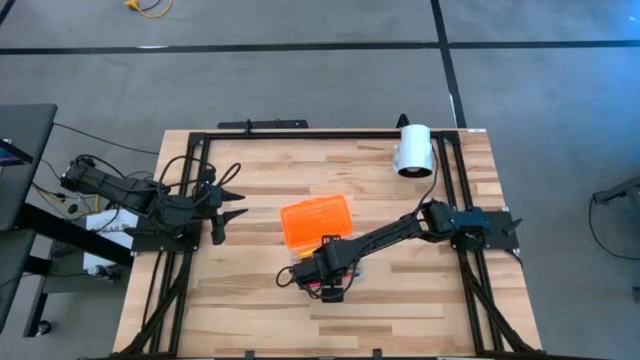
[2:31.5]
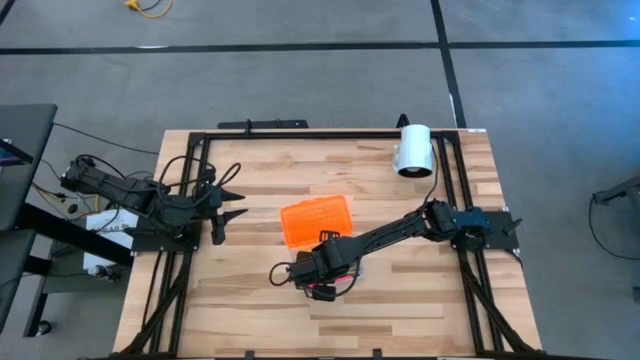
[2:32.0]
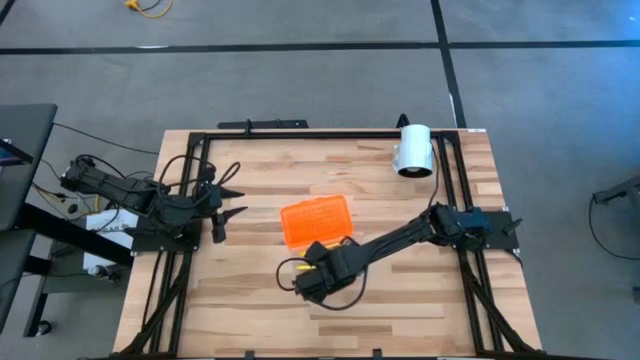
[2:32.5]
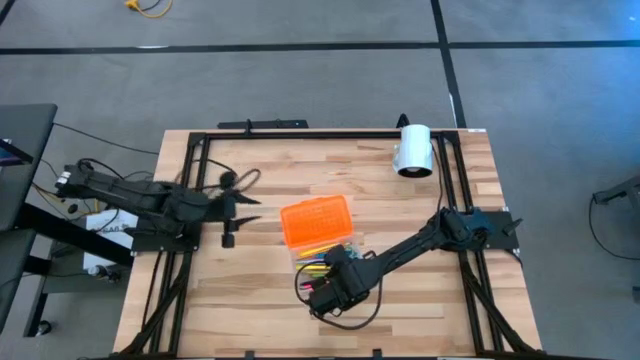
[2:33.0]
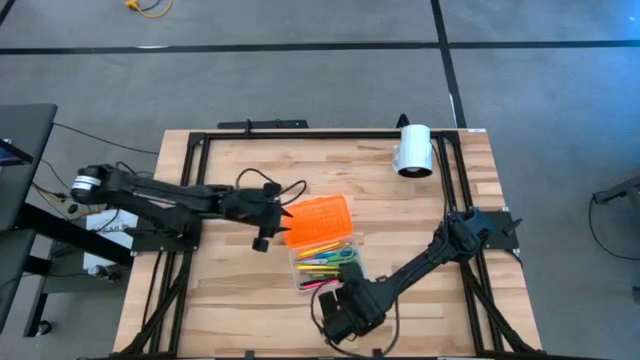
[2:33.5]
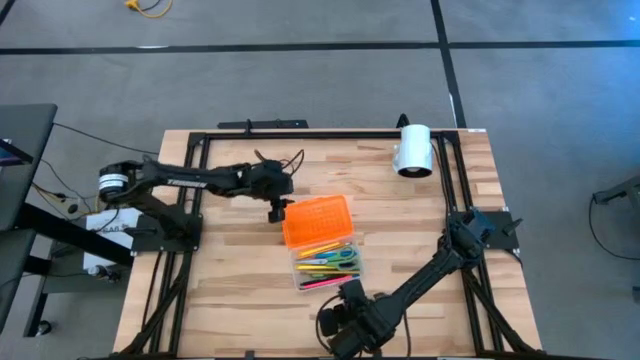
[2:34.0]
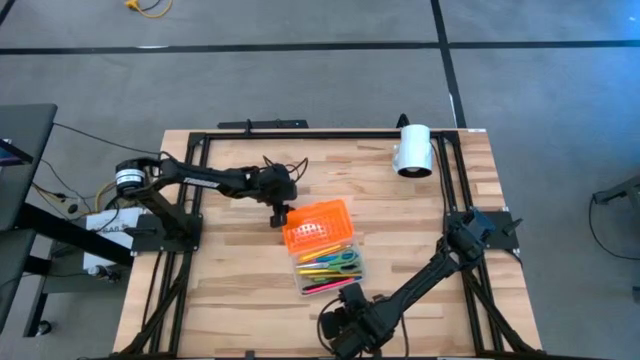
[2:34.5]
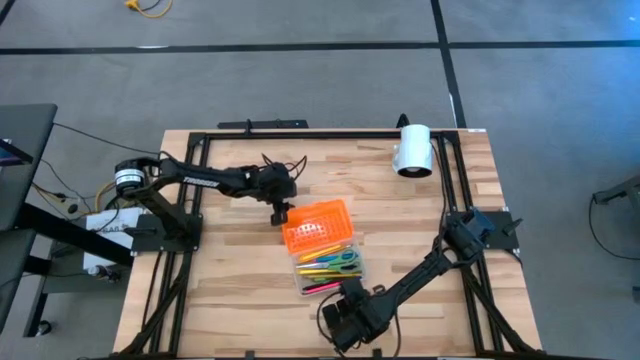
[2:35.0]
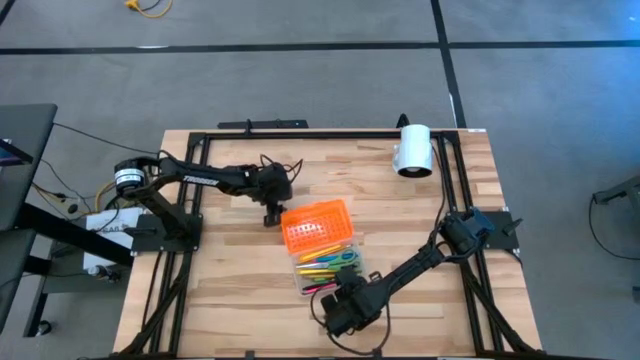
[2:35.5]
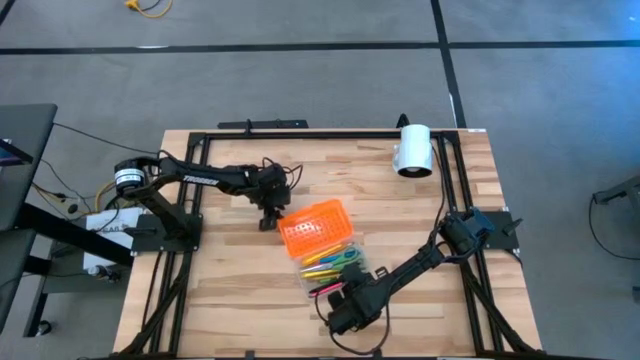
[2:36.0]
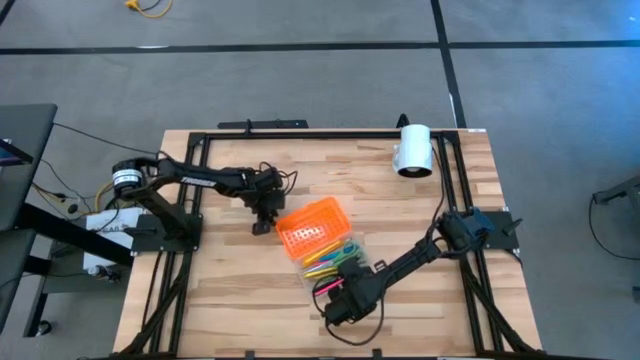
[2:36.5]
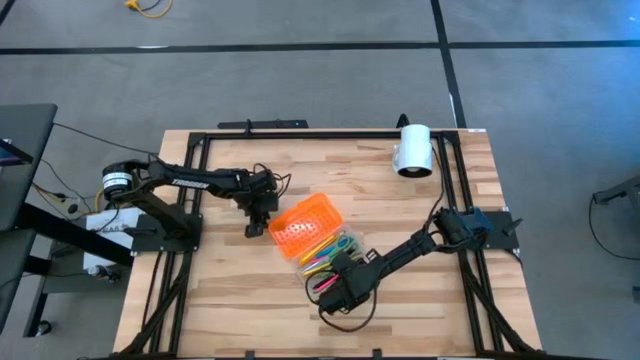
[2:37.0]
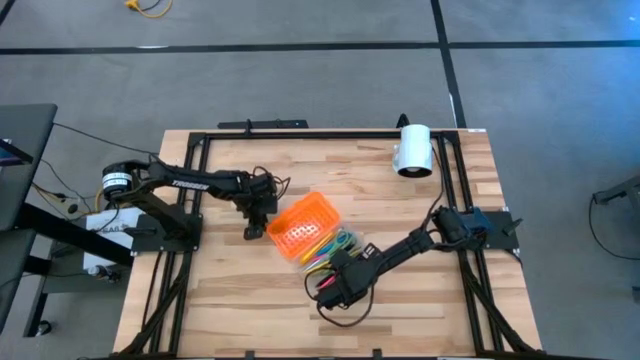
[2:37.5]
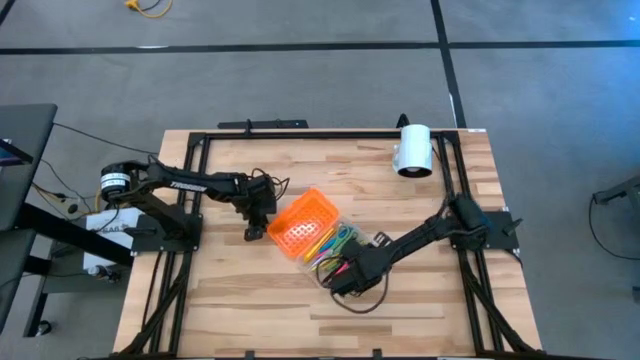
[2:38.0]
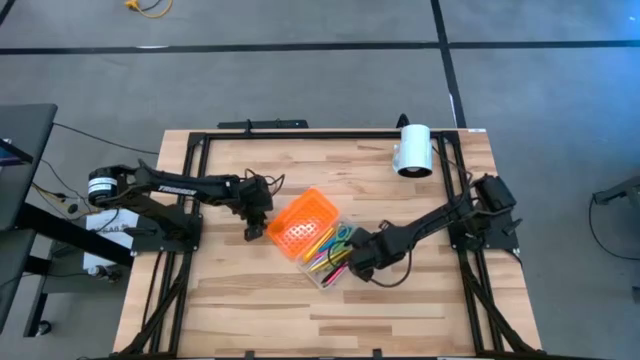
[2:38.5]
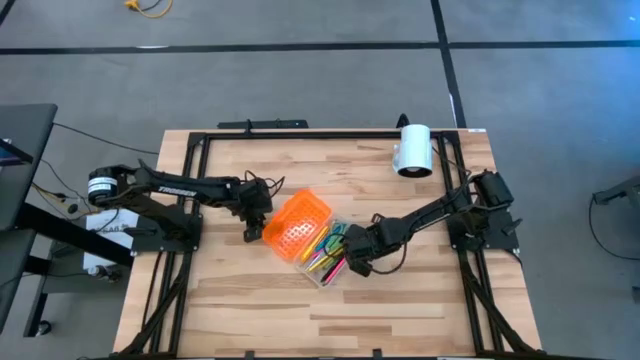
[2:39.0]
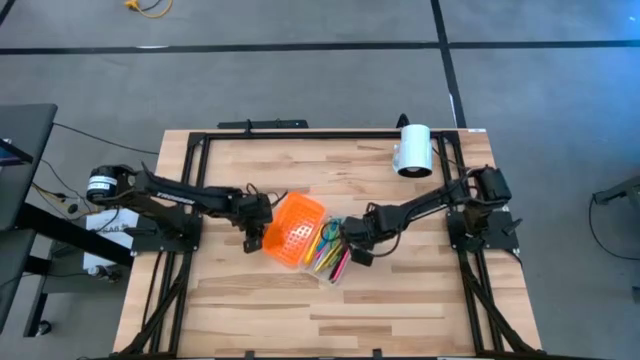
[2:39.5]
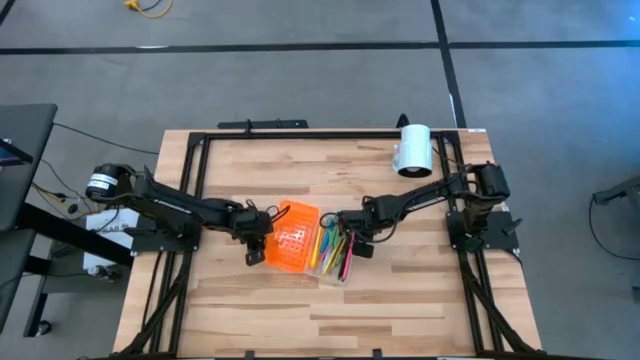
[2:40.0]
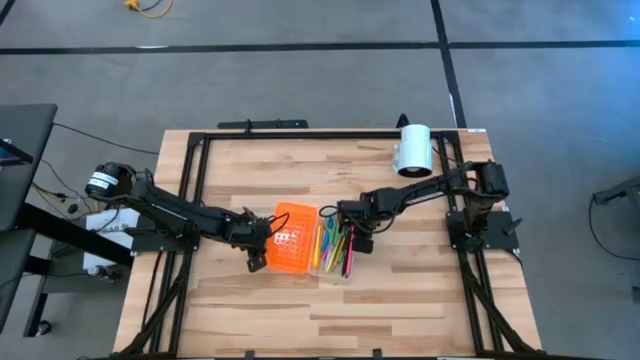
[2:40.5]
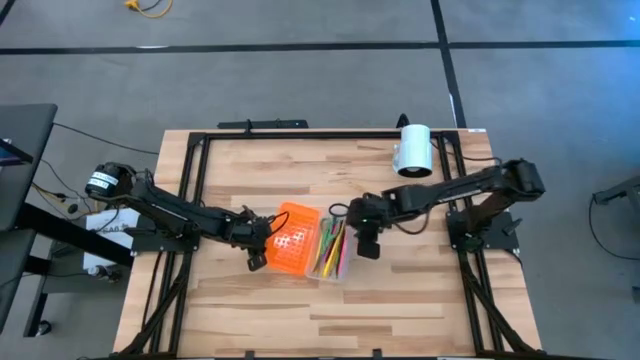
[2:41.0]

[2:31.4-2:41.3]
Task: Pick & place school supplies into a supply box
Close the supply box

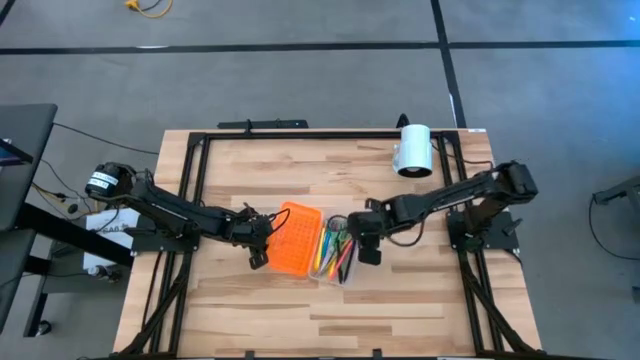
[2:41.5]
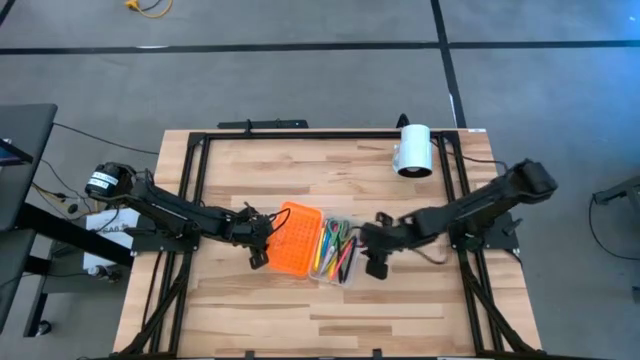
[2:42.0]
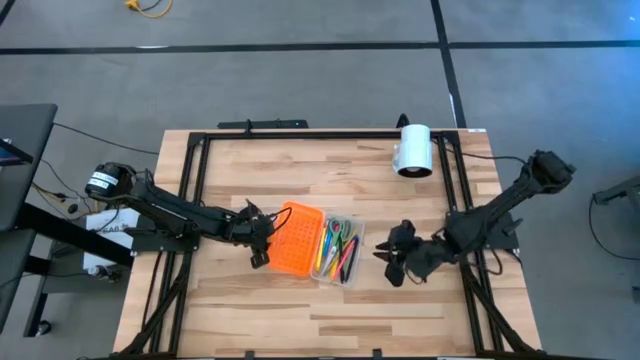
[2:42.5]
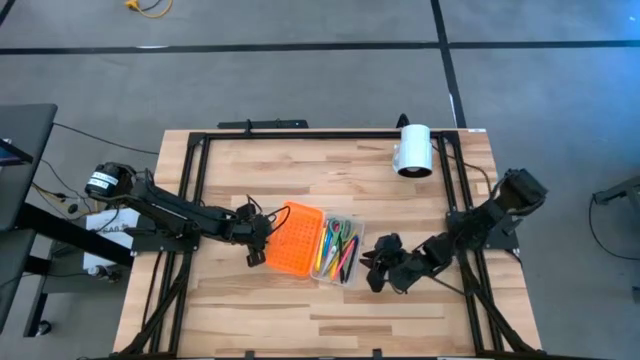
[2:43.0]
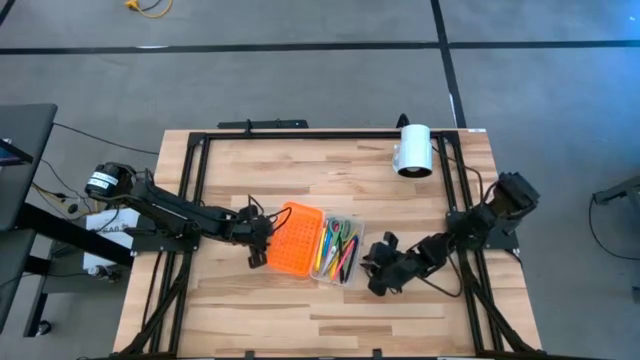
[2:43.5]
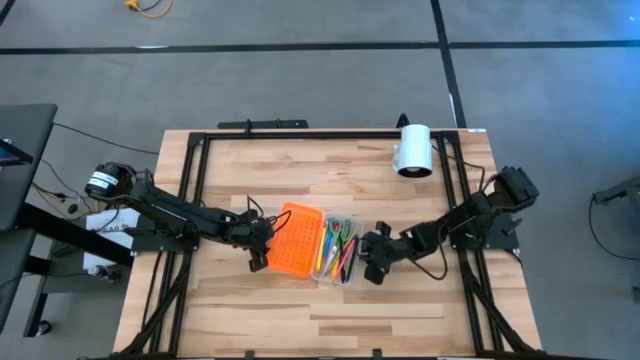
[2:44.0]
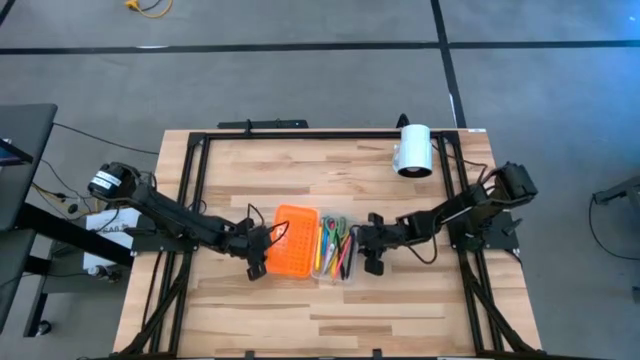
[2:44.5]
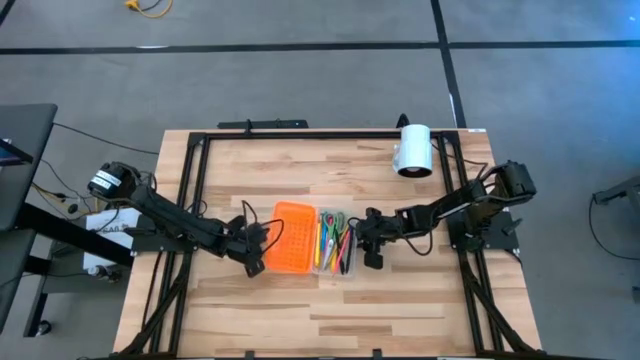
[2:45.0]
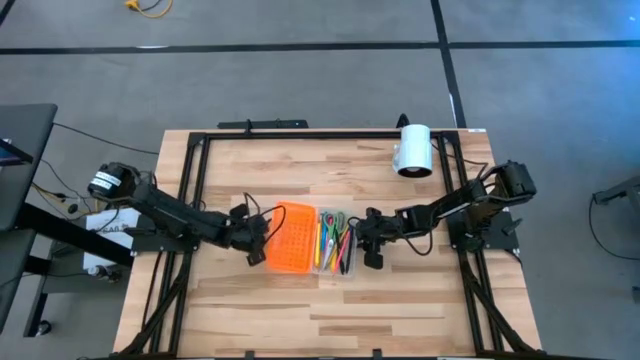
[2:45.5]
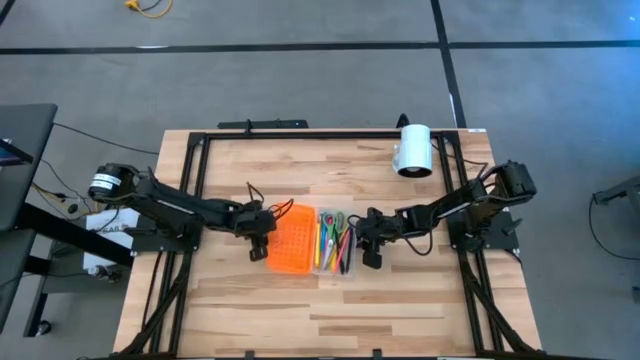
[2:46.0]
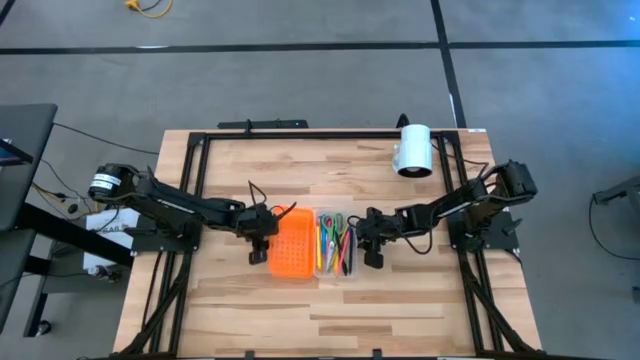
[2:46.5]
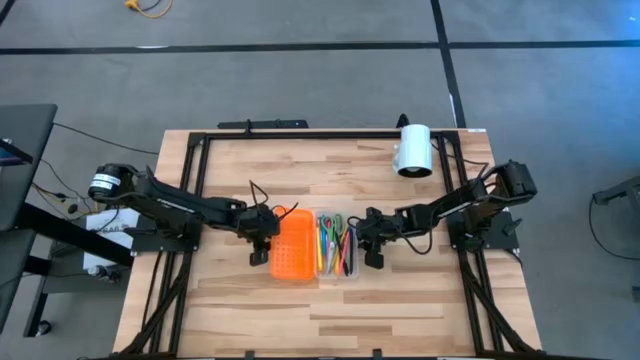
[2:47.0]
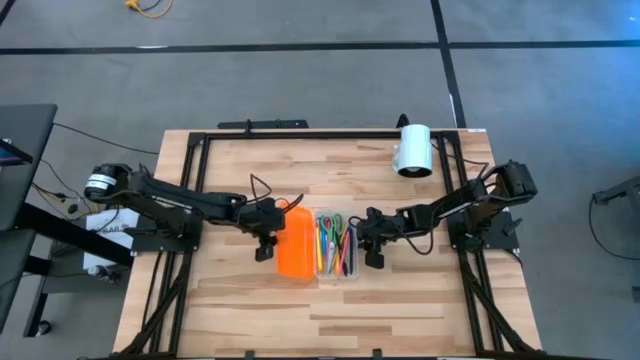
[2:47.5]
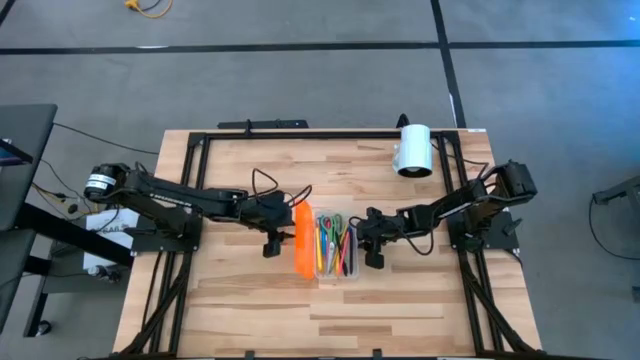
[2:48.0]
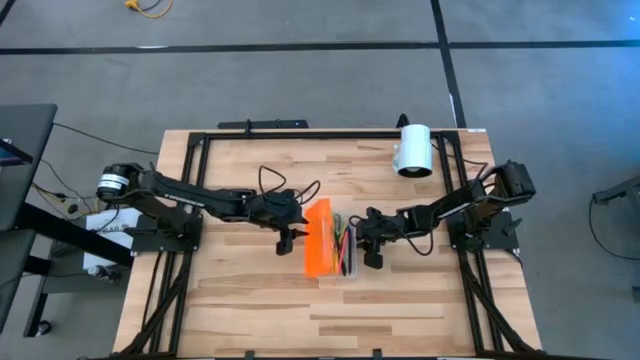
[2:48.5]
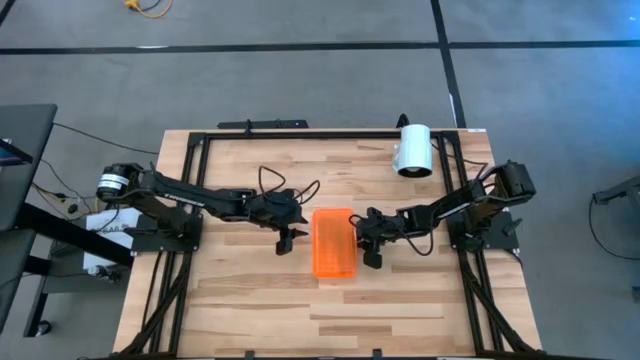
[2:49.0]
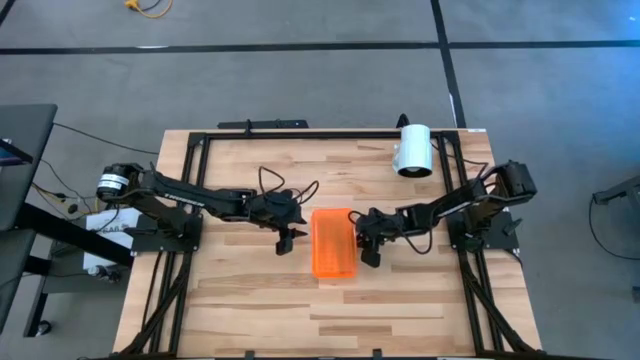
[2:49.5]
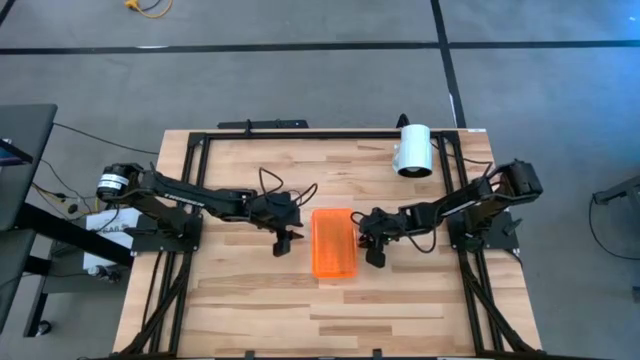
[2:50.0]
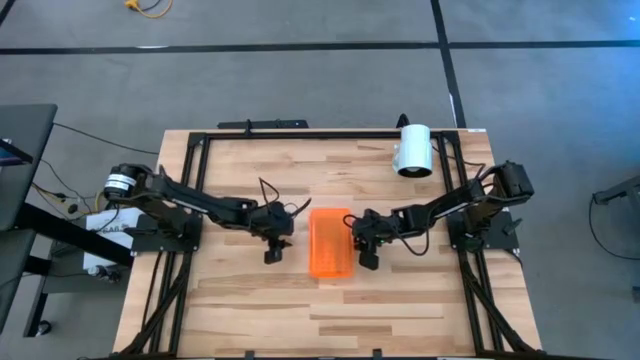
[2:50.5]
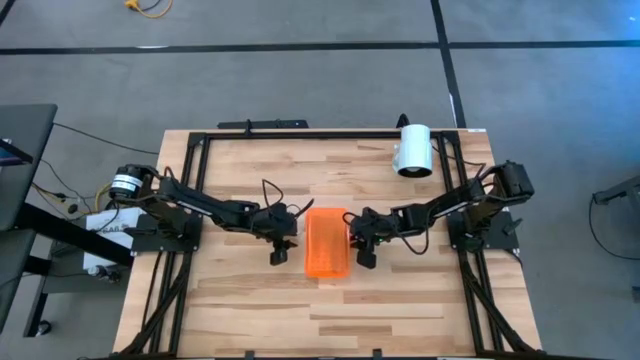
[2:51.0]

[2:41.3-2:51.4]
Close the supply box

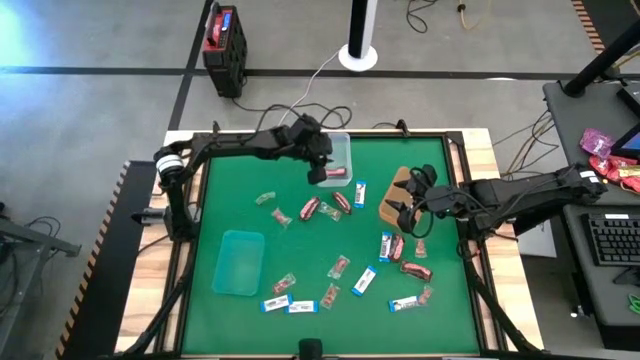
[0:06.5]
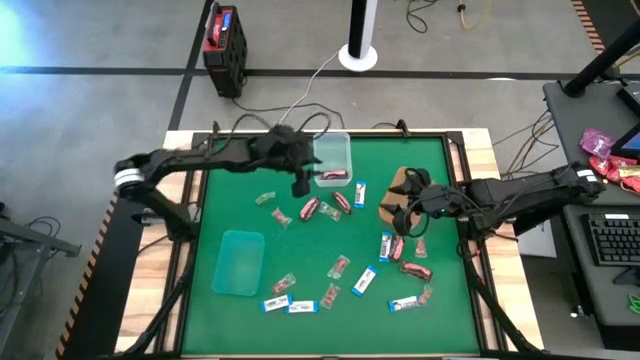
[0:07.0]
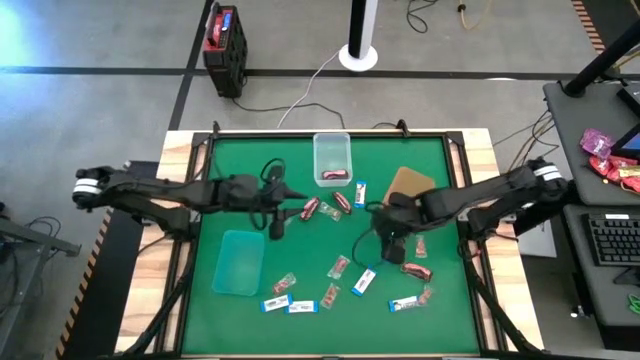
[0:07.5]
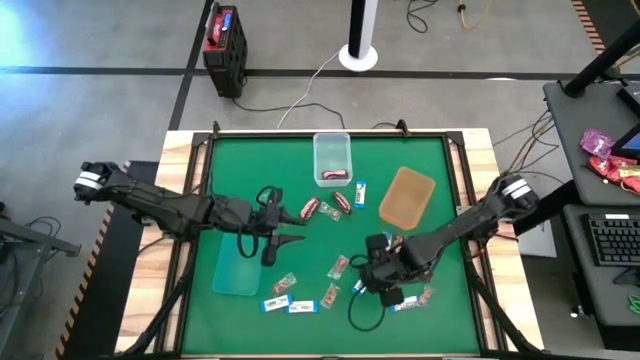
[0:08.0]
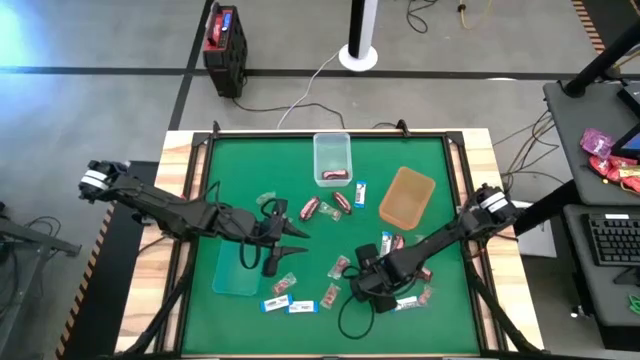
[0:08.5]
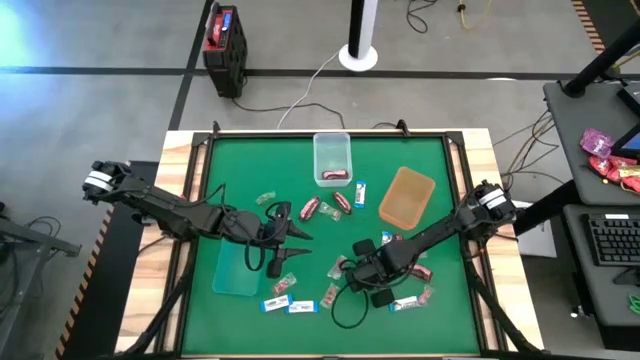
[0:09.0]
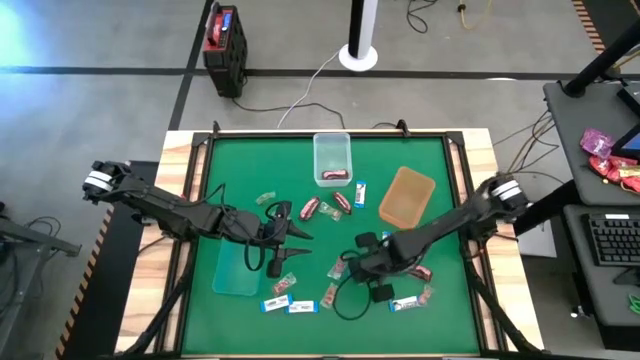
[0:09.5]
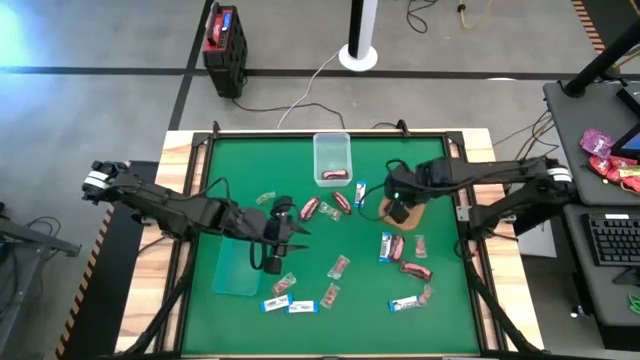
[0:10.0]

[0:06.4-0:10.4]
Task: Sort candy by brand, put in halloween buckets
Put the white chocolate into the orange bin
